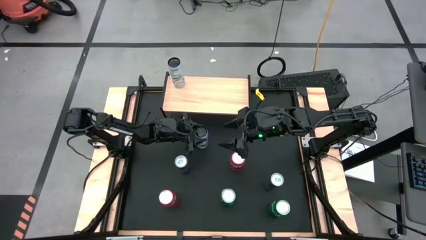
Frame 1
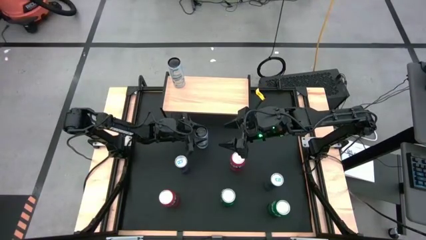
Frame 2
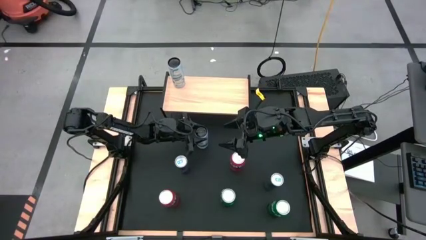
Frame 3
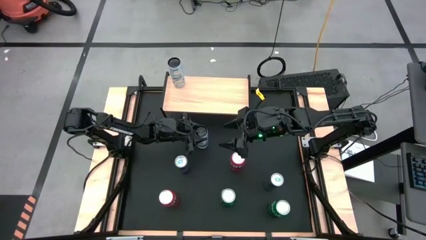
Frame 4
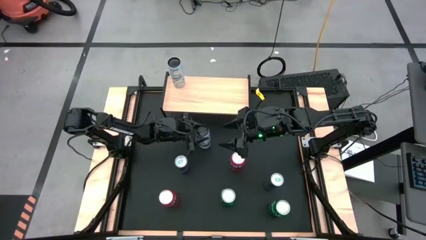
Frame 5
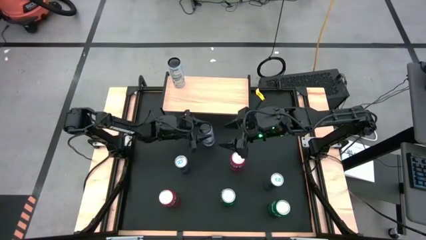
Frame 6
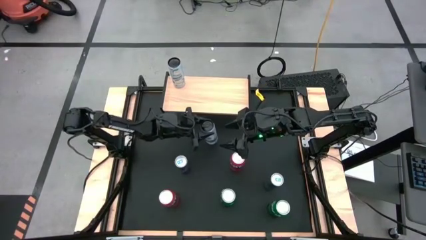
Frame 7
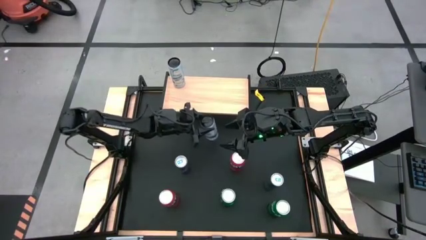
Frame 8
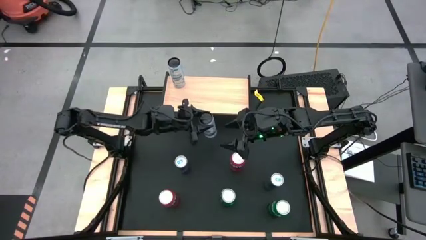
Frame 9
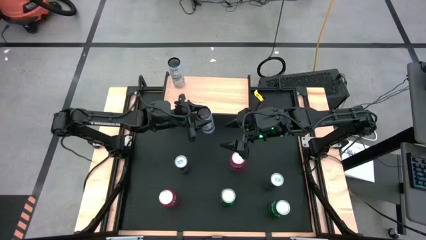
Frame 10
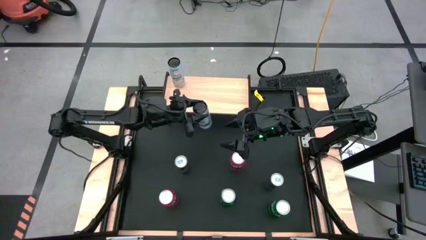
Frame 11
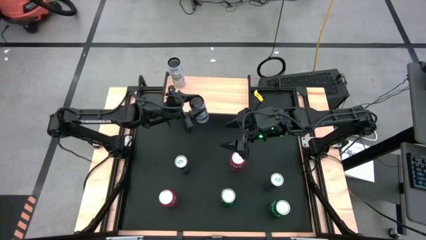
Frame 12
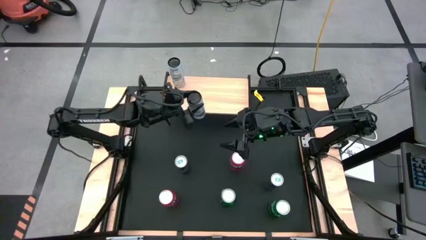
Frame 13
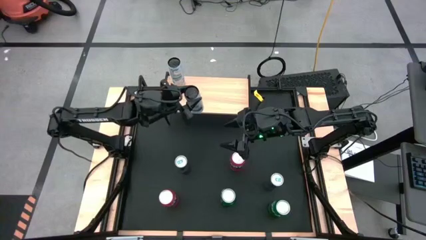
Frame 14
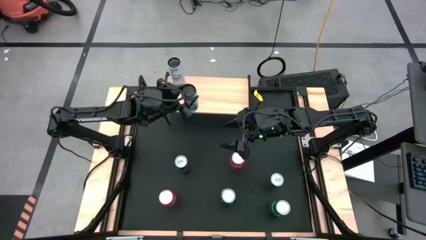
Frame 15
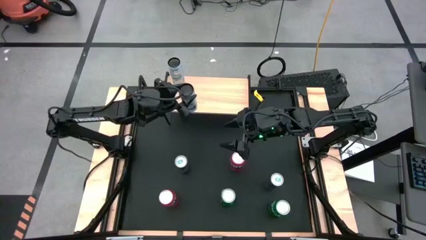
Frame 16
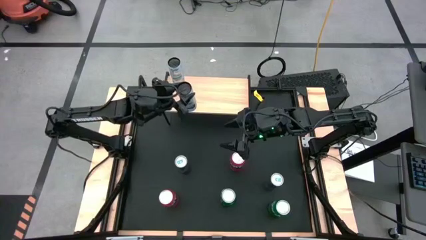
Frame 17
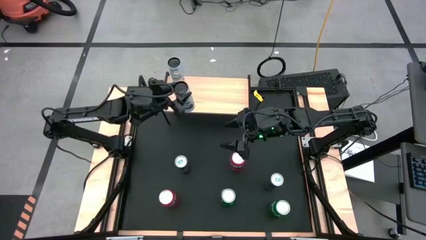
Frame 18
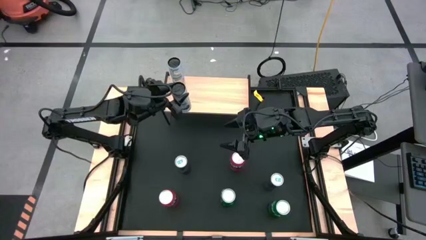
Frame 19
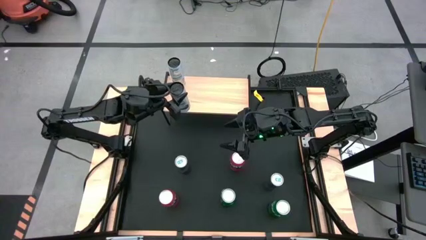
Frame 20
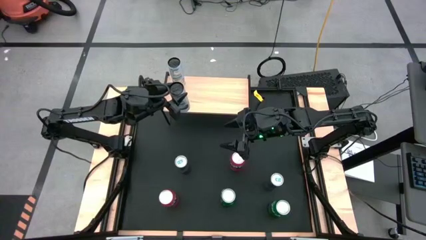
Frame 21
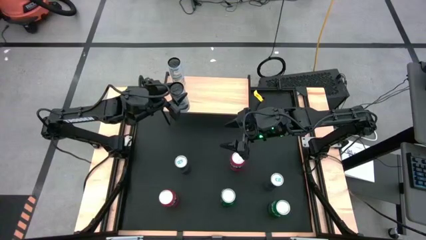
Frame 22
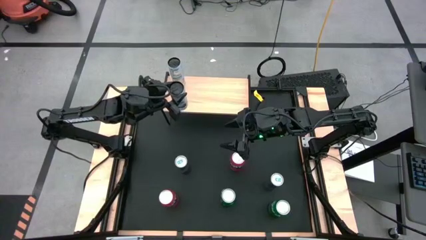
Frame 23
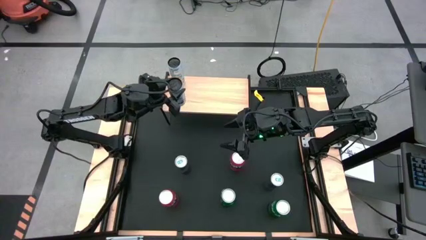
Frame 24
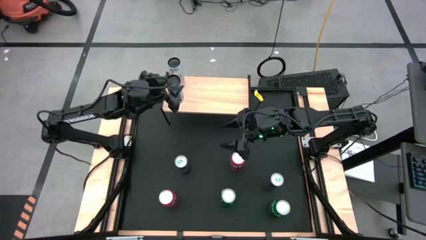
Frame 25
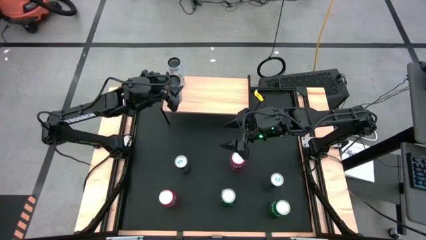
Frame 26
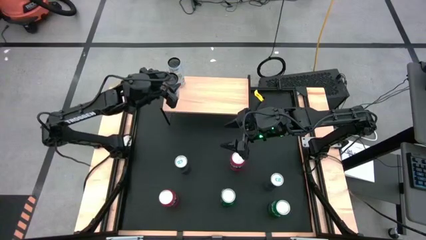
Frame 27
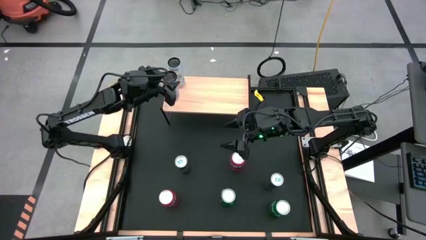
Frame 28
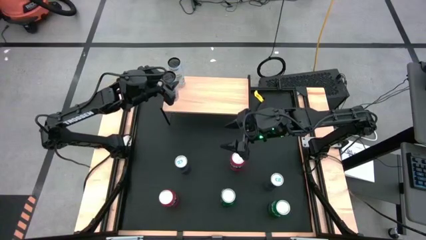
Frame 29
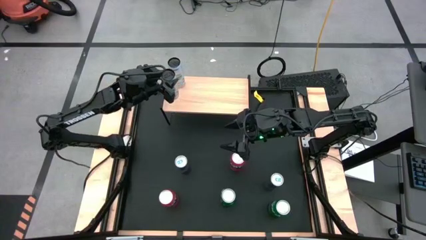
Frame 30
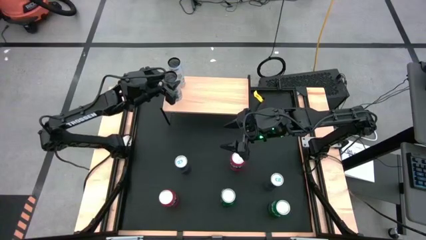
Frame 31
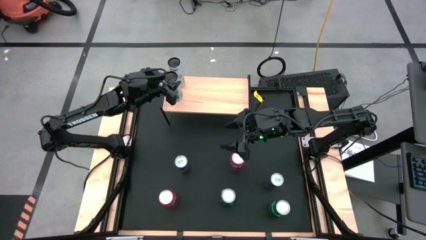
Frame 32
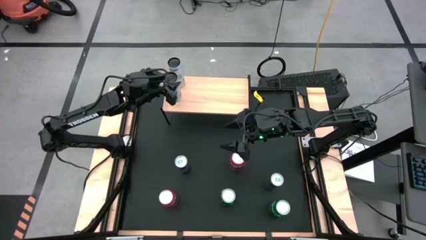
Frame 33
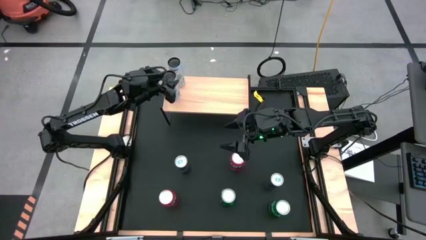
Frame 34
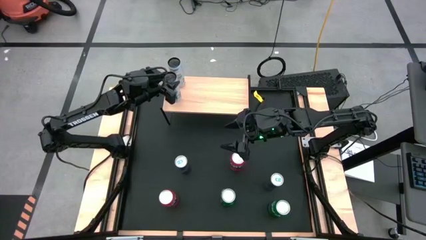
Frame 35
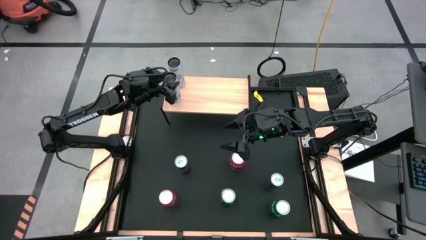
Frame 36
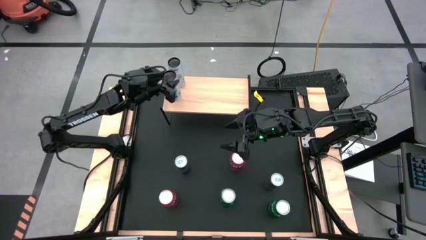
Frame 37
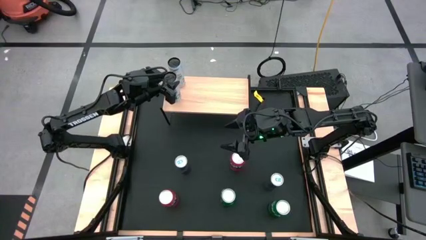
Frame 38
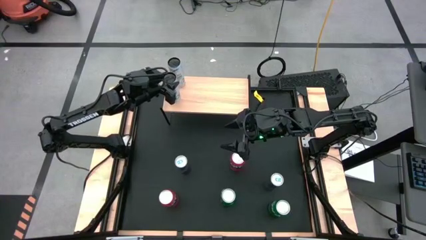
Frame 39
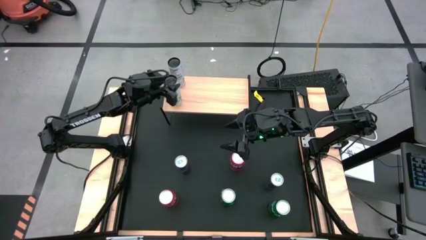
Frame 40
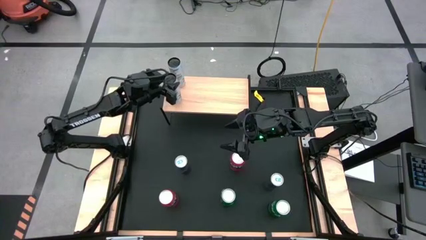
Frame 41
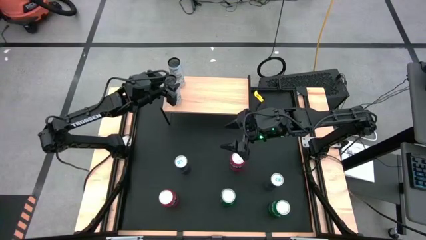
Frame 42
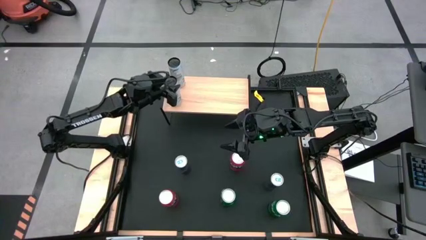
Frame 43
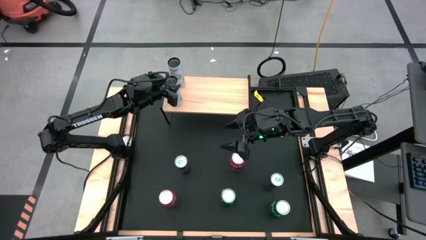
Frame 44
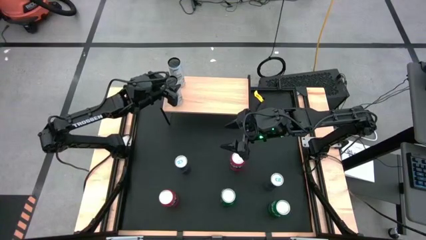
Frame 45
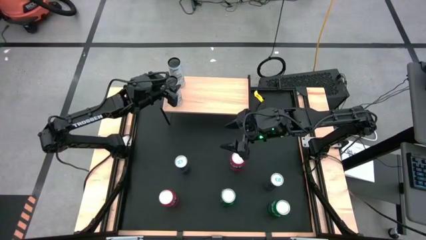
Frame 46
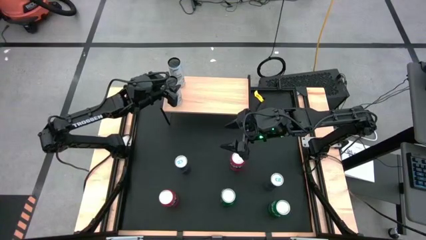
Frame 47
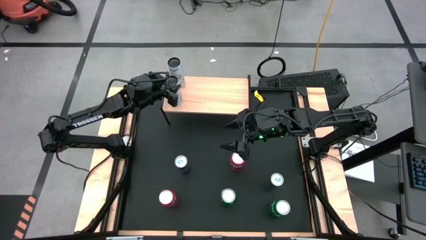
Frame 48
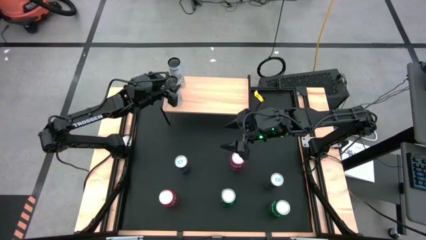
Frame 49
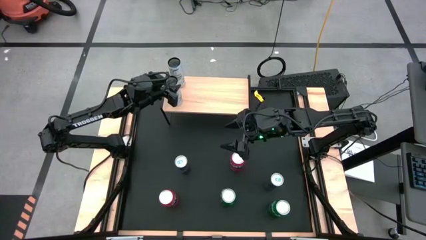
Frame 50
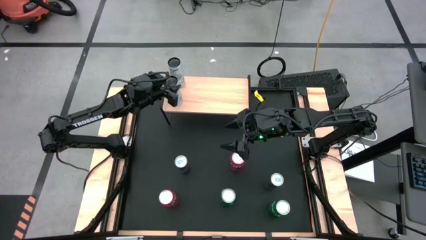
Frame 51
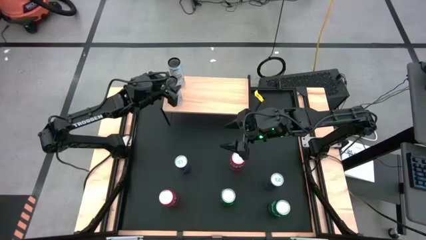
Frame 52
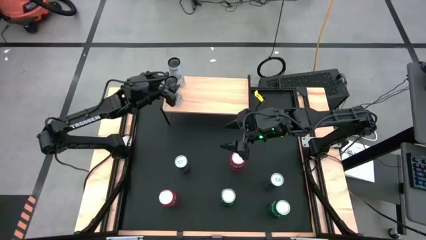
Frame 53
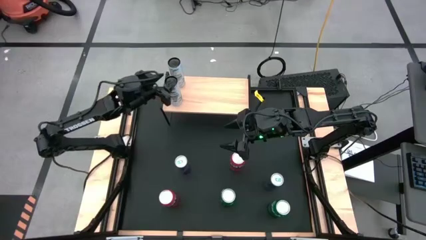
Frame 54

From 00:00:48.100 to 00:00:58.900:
Task: Place canned beverage on shelf
Put the white-blue soda can, aligned with the other white-blue soda can on the shelf

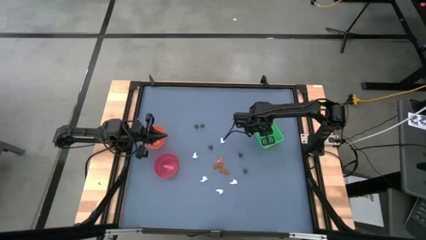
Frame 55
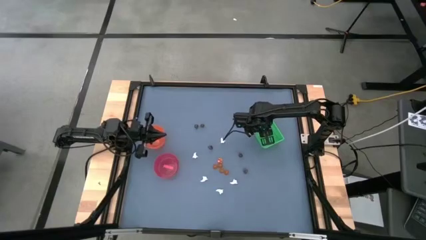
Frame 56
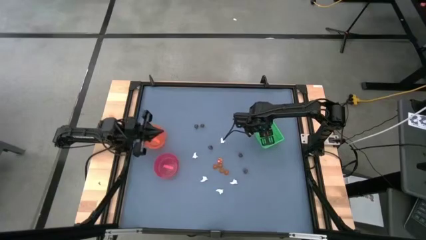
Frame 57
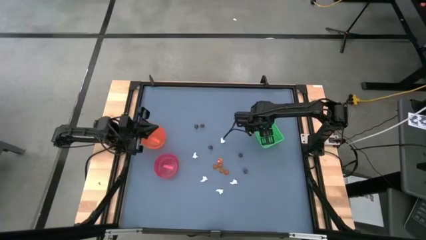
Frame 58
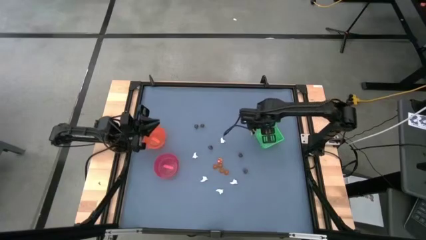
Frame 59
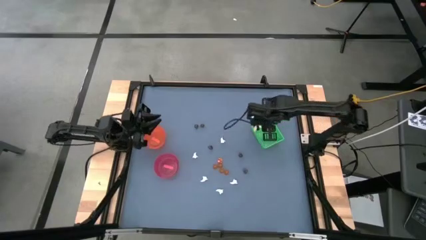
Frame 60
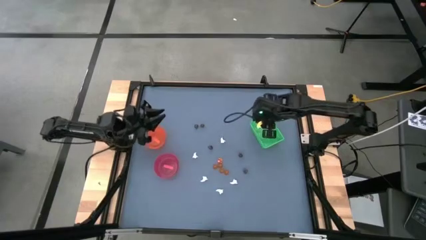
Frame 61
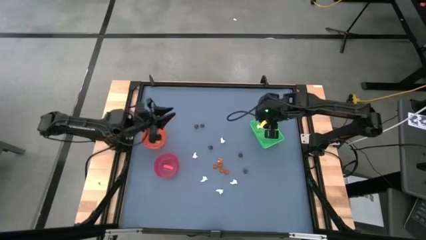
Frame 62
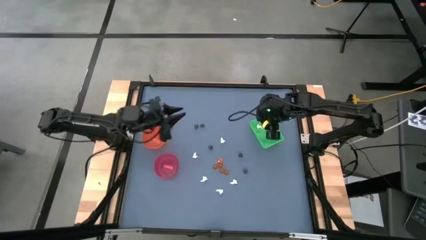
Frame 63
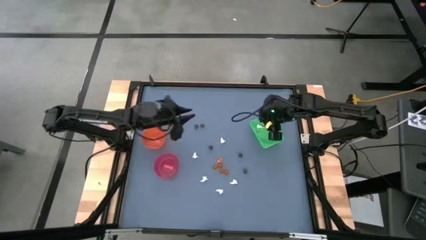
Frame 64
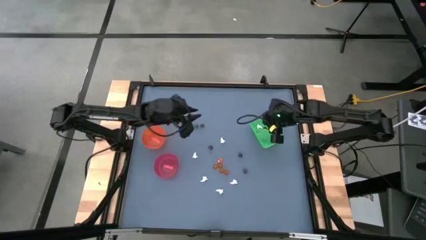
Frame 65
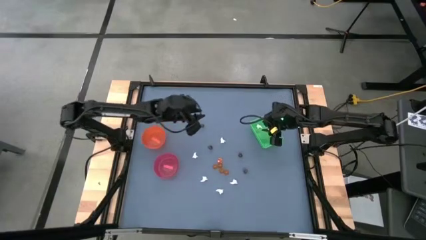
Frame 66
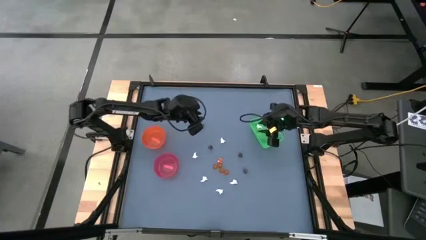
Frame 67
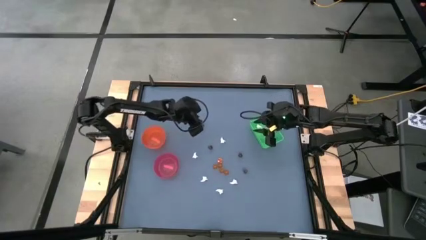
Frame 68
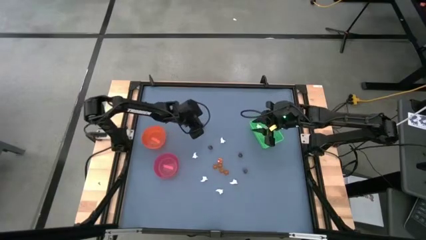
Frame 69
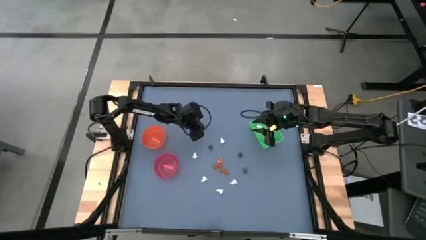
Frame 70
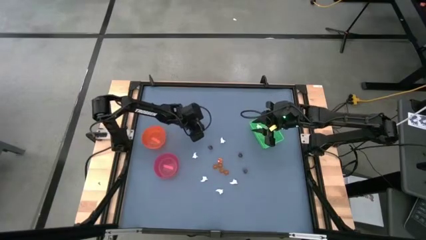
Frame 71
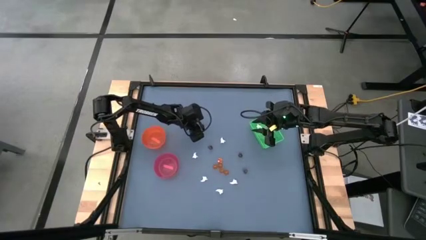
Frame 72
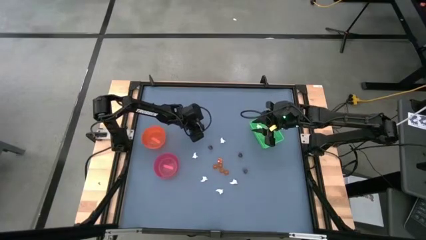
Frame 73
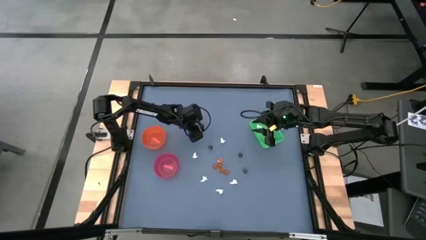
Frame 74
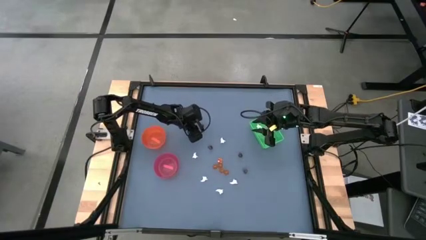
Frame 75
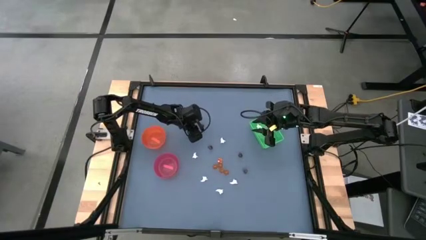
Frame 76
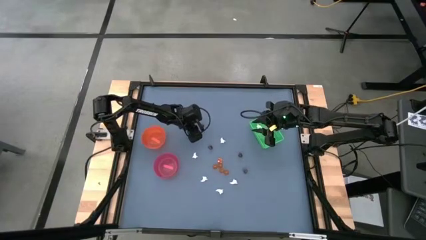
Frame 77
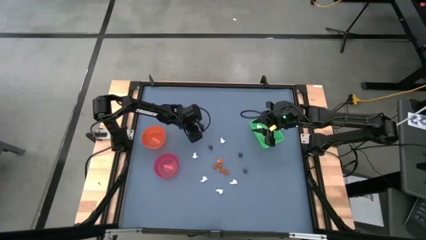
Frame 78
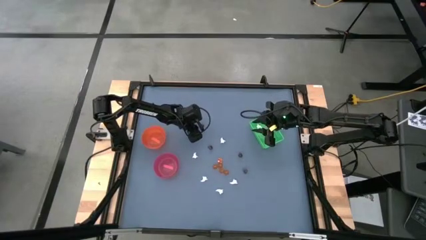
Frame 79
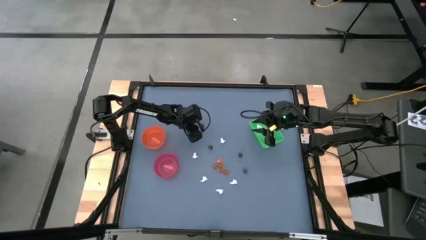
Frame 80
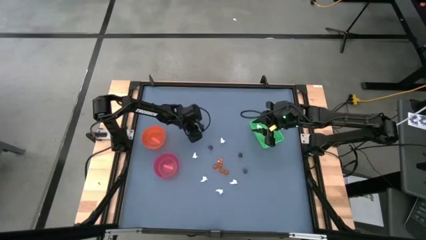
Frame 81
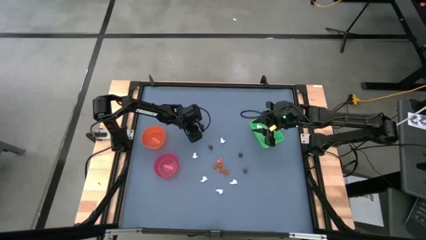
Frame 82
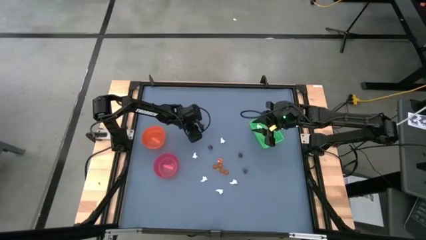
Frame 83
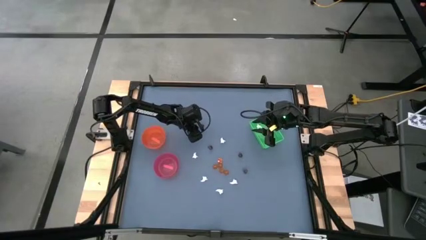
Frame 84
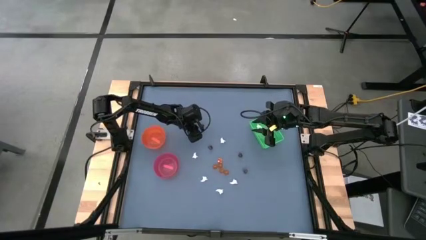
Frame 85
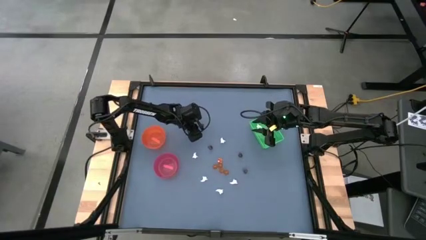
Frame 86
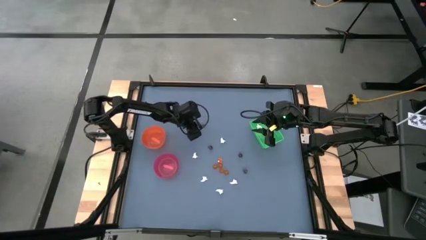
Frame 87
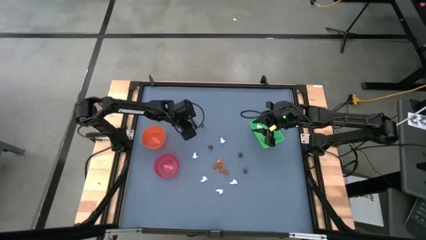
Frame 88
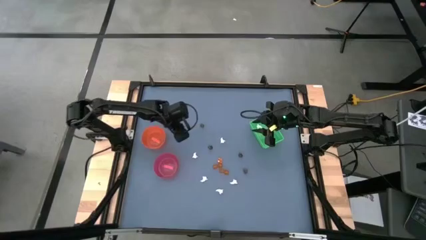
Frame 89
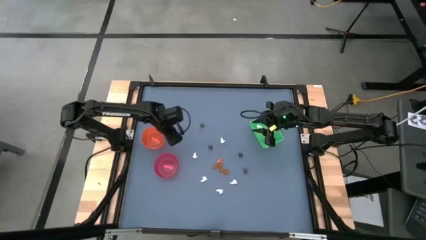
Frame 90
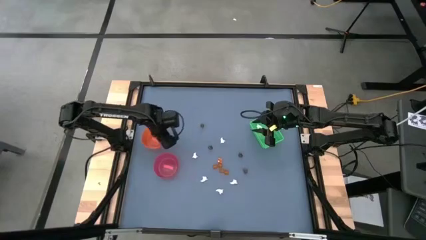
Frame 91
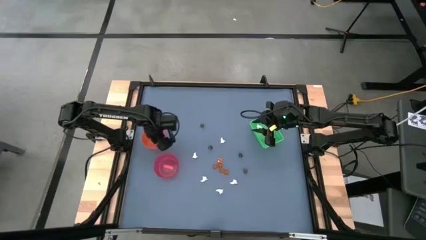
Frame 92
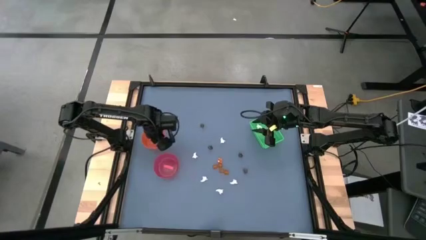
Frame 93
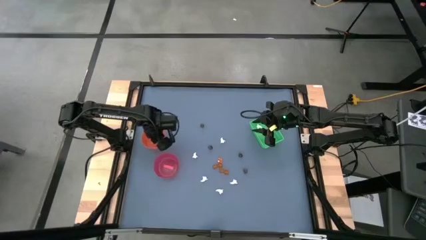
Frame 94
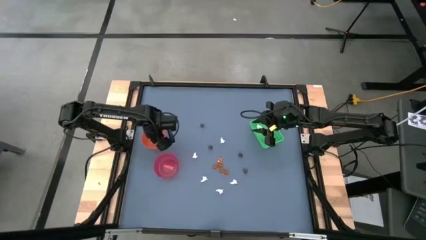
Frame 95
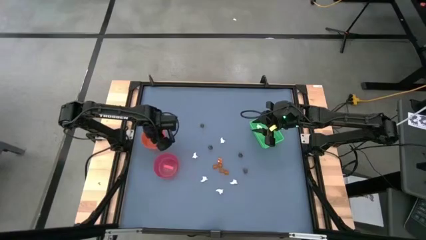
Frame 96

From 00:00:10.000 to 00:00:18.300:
Task: Sort Halloween decoration
Put the black skull toy into the orange bowl
